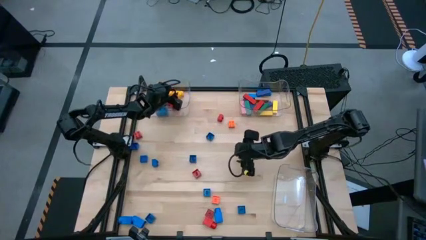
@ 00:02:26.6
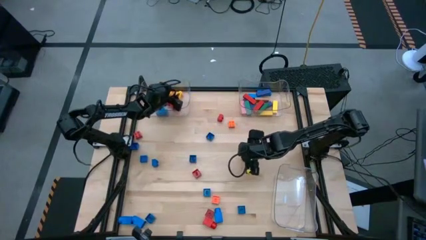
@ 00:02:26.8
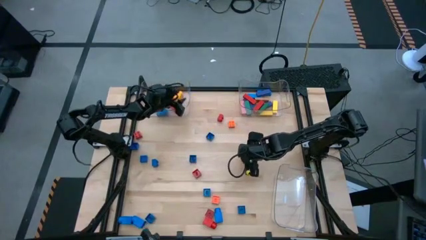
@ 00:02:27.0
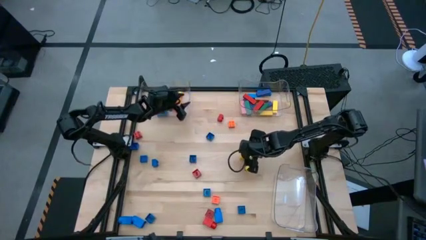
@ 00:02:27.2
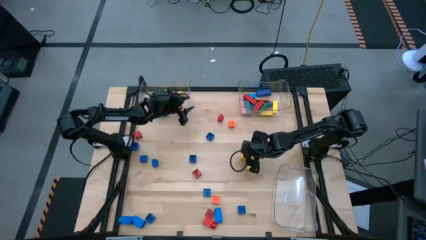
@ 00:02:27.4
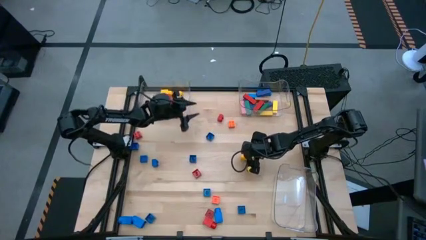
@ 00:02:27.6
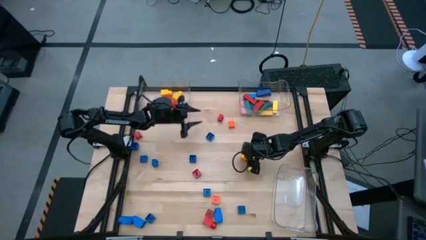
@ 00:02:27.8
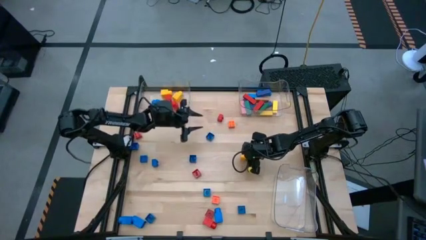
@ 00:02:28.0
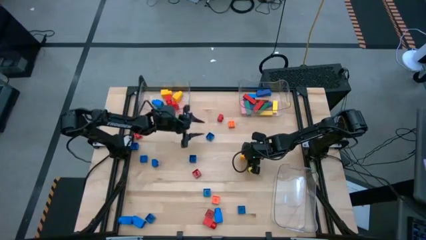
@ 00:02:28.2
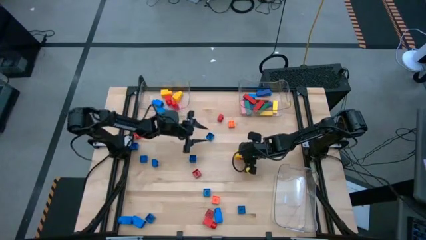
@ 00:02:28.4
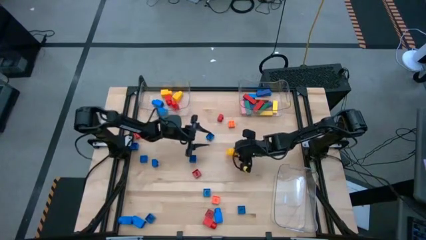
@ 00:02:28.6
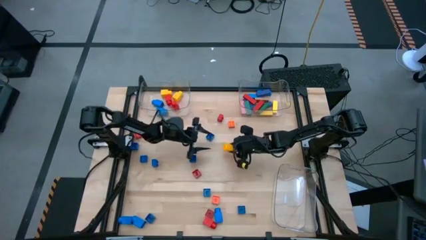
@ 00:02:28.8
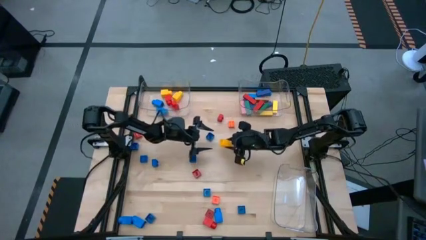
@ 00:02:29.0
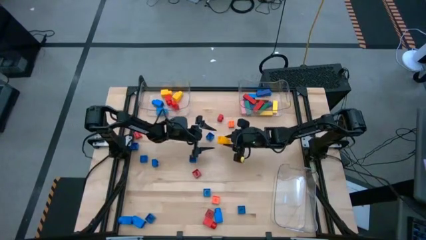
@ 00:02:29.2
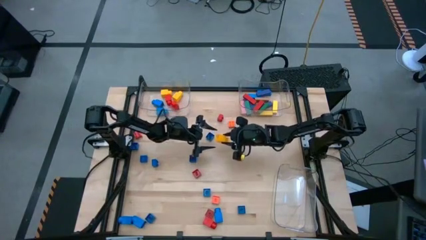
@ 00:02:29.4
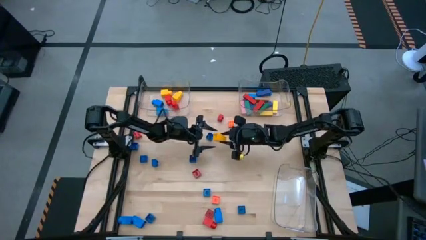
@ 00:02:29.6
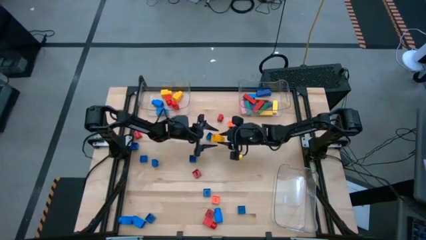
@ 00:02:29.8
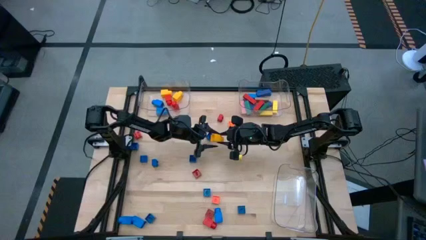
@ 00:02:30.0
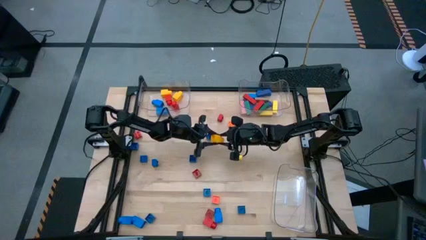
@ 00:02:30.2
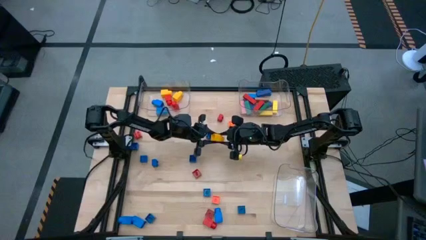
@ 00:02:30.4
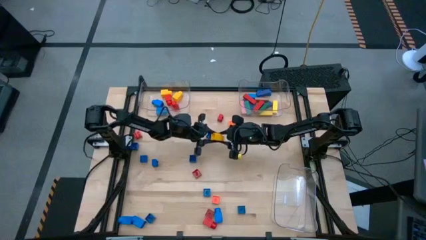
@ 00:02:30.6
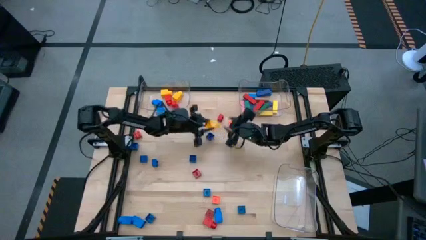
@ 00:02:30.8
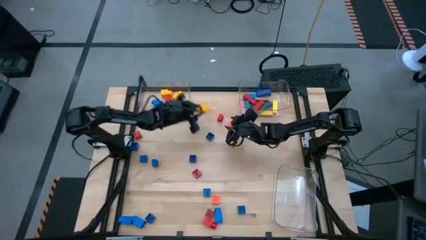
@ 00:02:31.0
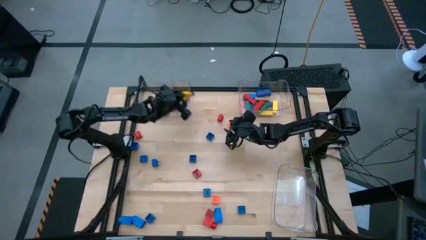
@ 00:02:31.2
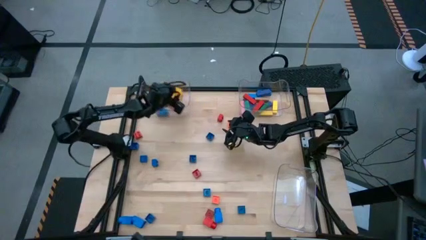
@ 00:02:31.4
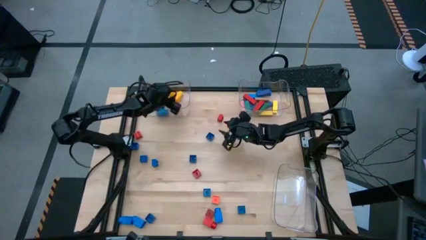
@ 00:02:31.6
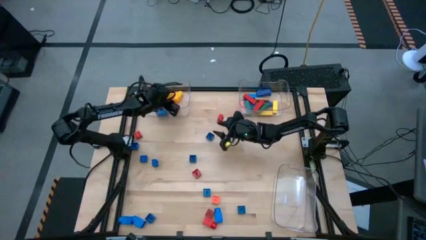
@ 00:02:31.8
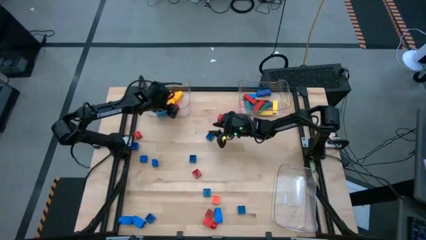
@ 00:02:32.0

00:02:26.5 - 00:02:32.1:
Task: Sort blocks by size
Put the 1 stud yellow game piece into the top left transparent bin

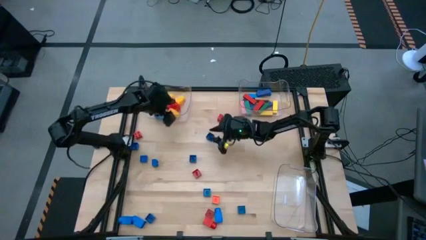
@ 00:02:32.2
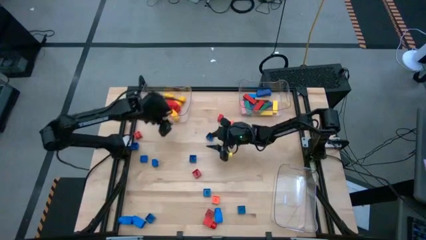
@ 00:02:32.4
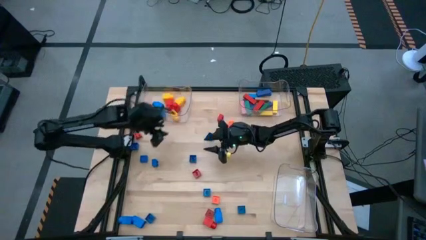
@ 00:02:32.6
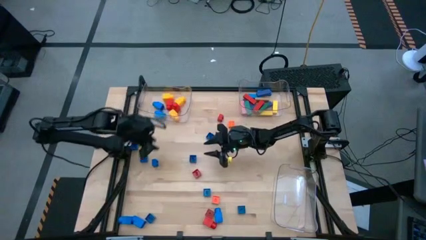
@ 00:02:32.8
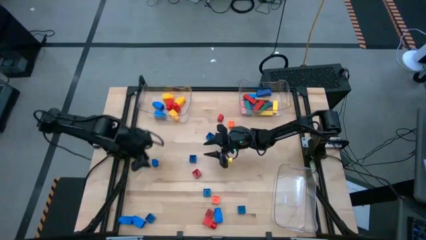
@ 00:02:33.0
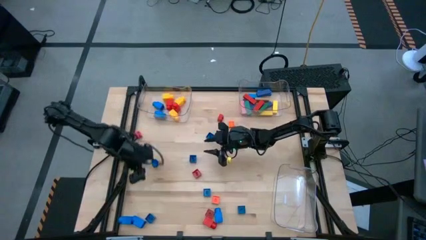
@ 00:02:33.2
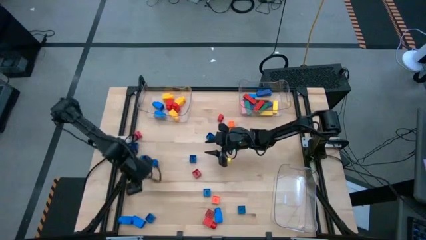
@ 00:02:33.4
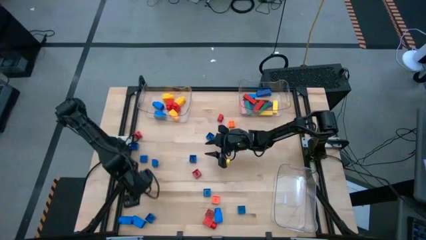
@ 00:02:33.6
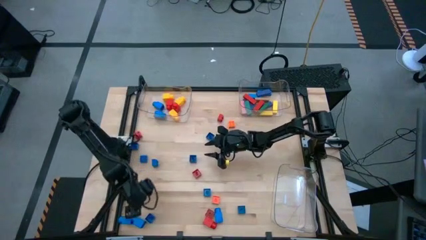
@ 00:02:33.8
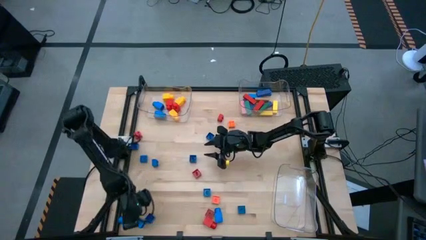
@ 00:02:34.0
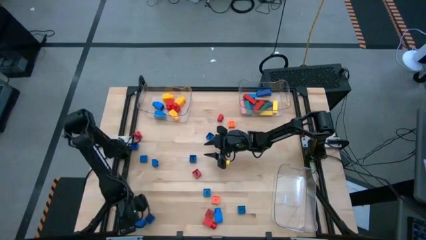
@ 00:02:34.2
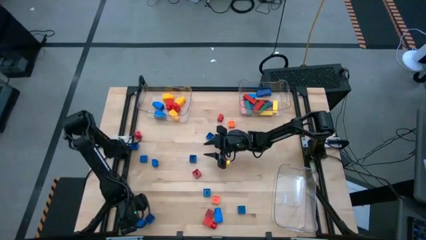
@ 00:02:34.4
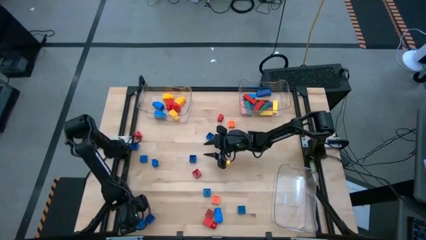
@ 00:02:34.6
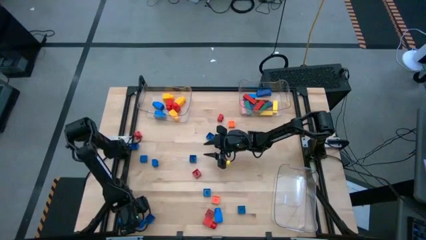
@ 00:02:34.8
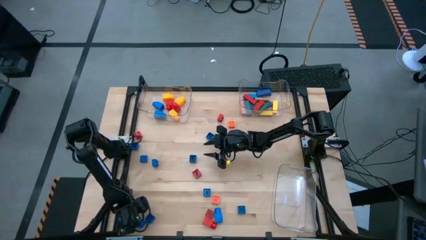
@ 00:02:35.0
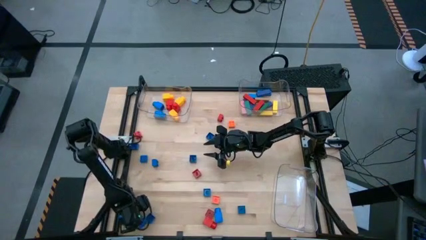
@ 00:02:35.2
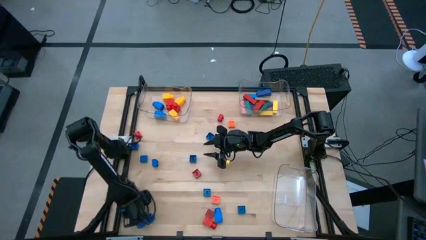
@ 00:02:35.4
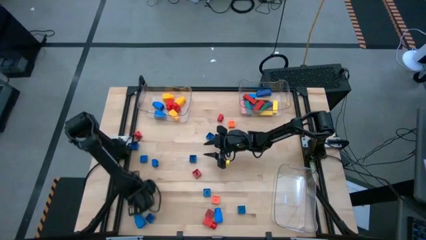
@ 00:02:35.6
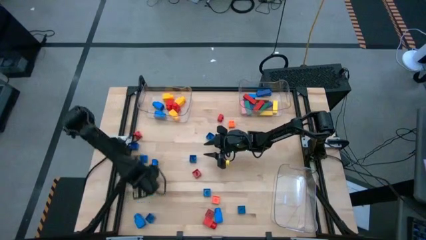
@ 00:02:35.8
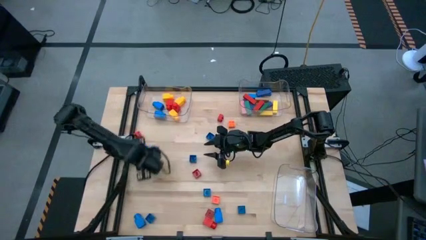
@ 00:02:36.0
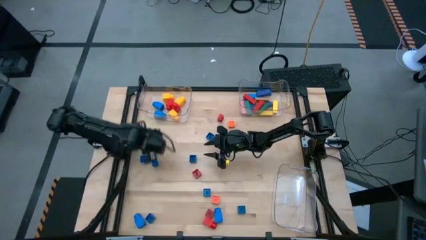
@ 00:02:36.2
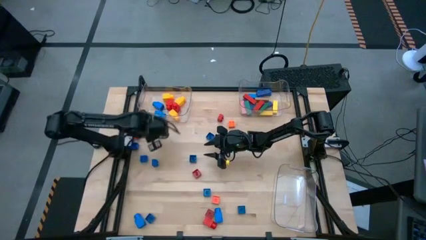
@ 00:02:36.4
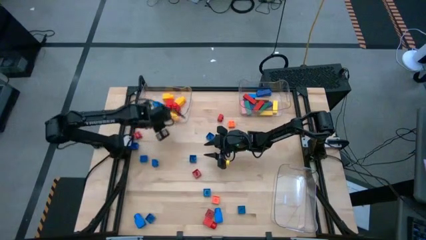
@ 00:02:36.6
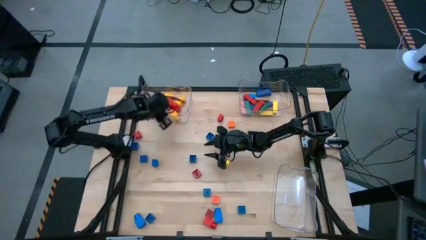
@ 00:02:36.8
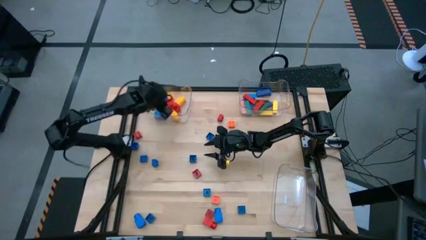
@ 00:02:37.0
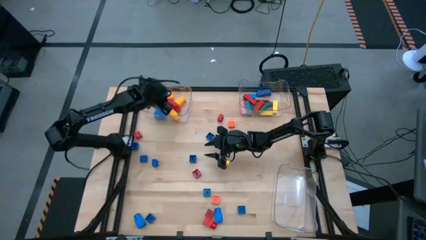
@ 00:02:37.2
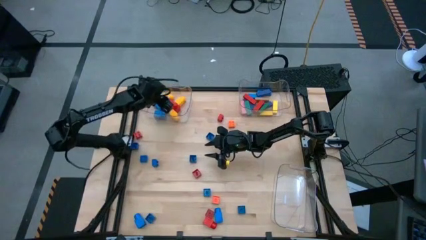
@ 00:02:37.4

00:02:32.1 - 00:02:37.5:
Put the 1 stud blue game piece into the top left transparent bin

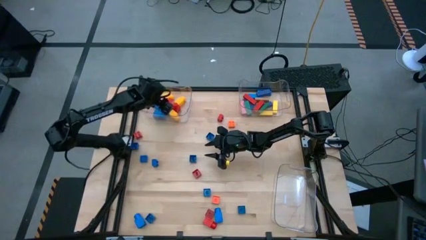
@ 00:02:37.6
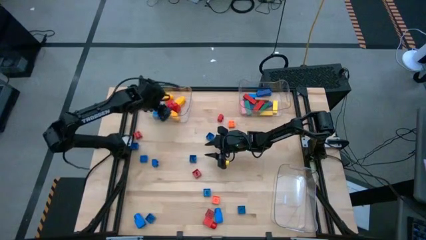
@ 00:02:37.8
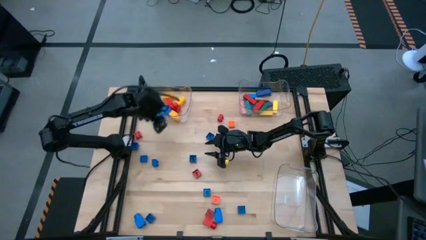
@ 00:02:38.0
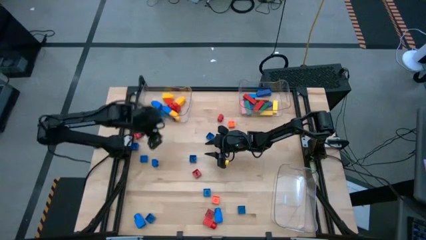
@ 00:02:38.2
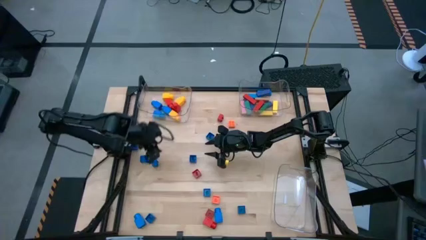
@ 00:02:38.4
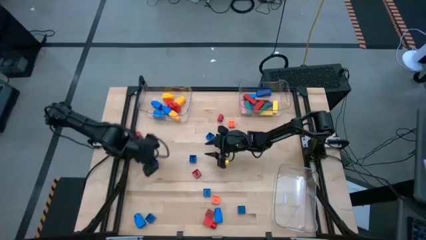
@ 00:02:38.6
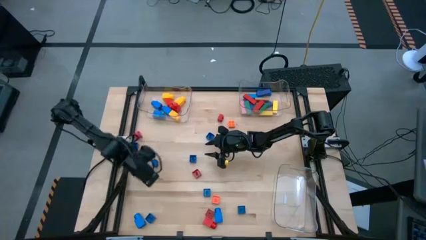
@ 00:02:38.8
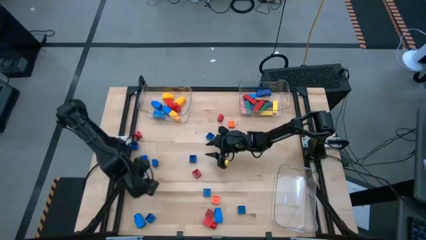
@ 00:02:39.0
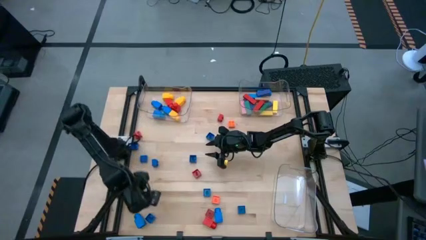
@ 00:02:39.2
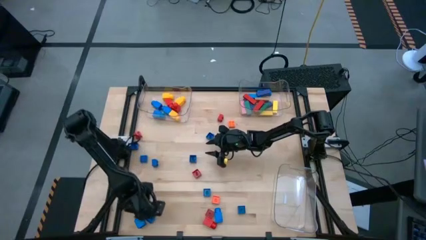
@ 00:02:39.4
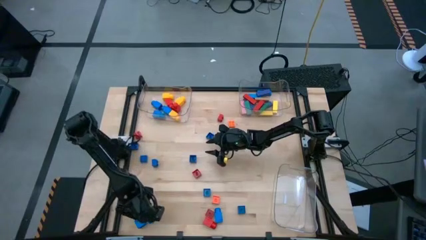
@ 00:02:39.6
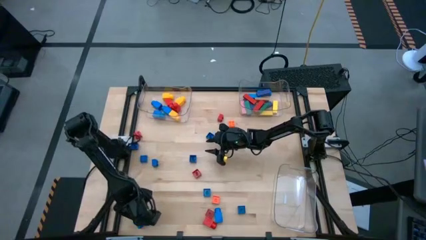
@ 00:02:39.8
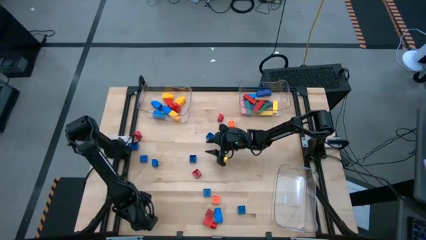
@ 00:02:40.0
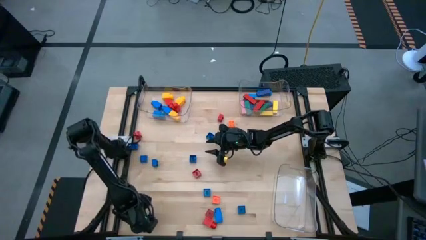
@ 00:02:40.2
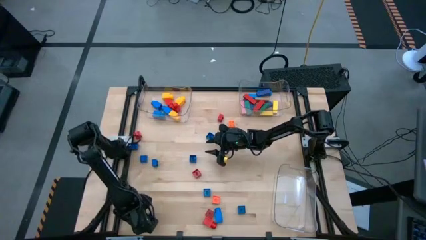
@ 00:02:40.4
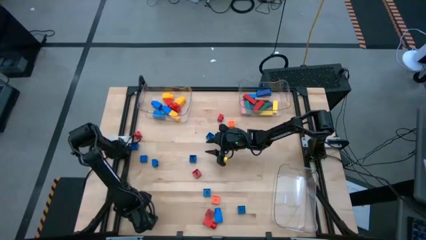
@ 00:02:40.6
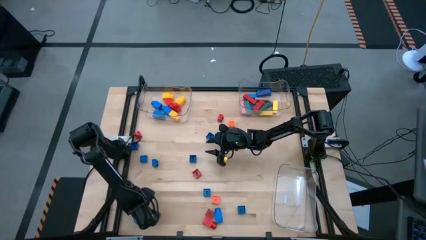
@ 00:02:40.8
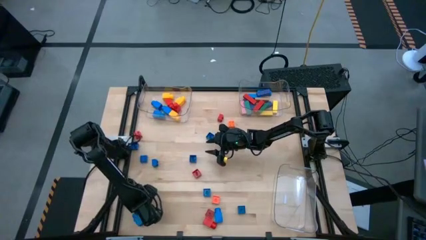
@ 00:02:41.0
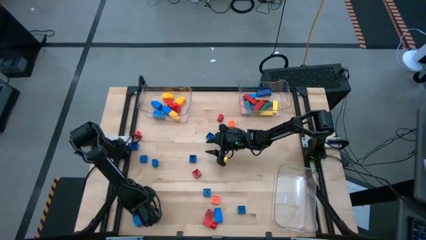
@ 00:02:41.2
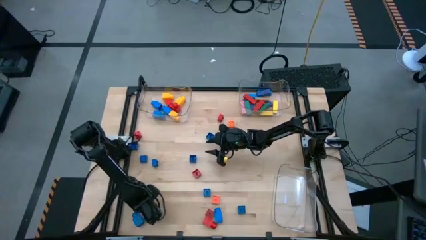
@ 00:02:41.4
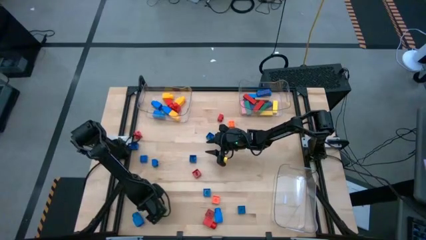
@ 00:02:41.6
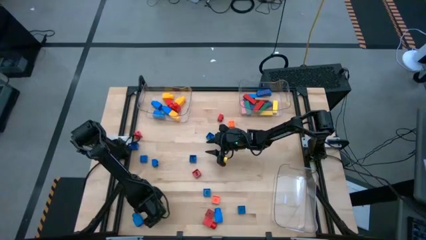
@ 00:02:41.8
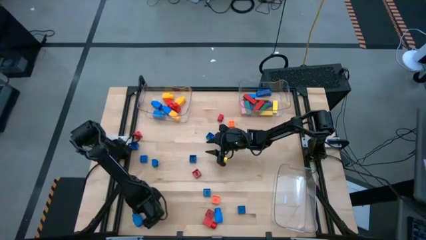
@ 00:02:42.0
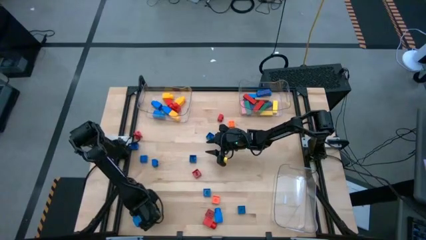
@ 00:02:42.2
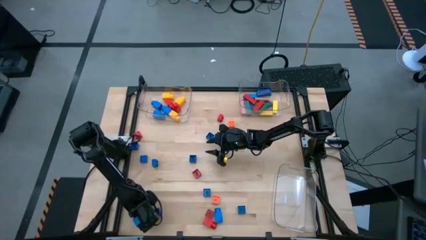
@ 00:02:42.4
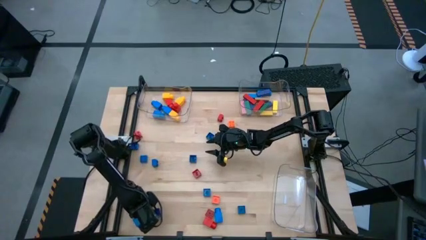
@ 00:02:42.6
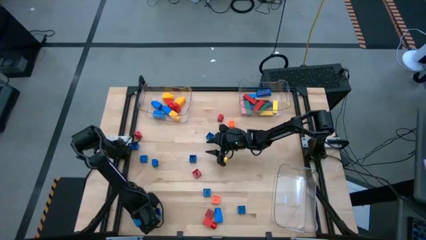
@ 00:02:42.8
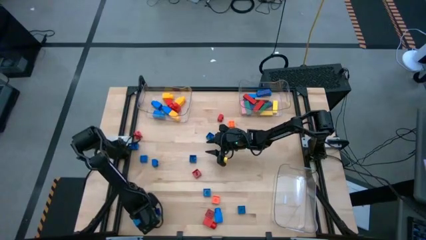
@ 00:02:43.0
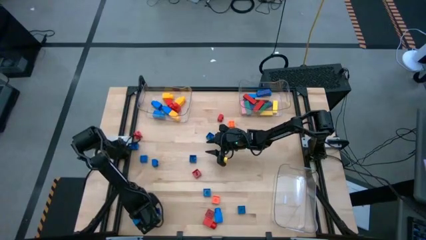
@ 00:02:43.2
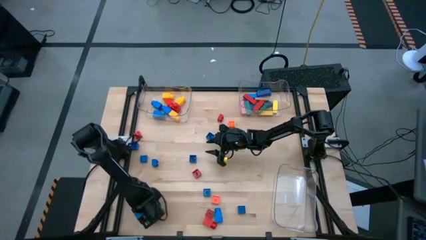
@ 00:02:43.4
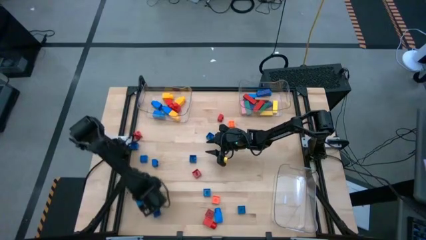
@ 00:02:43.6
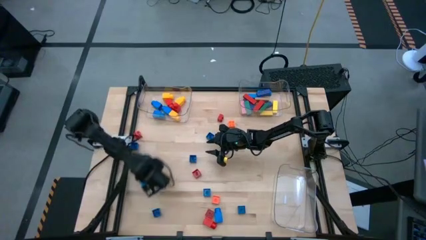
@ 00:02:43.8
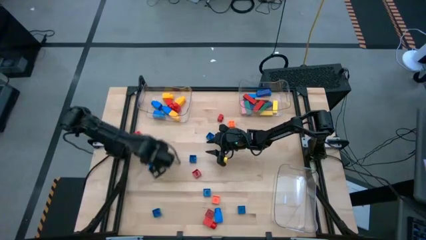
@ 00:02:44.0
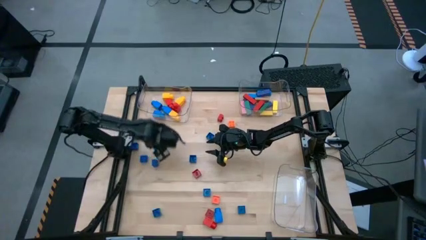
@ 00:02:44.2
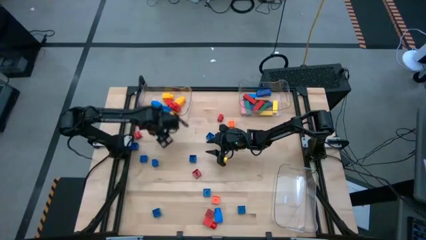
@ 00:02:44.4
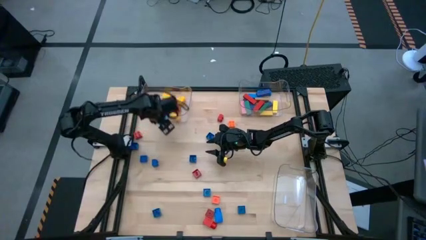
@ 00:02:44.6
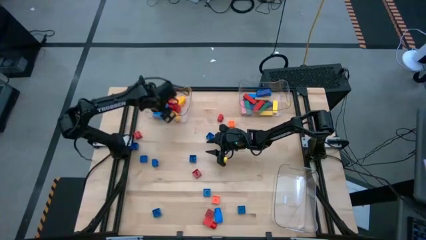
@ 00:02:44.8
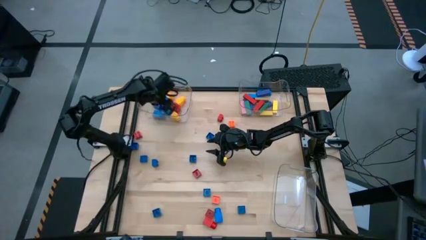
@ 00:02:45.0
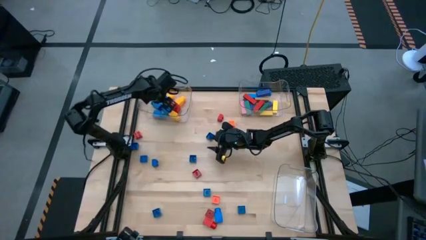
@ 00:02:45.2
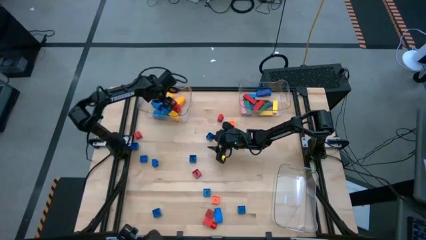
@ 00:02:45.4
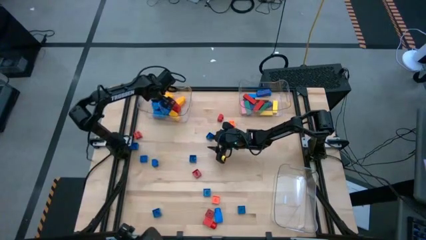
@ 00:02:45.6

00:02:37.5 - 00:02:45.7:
Put the 1 stud blue game piece into the top left transparent bin
